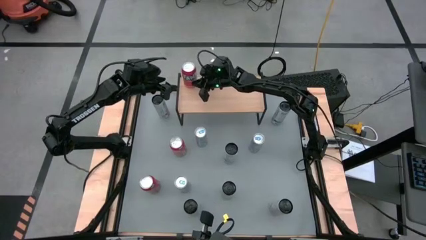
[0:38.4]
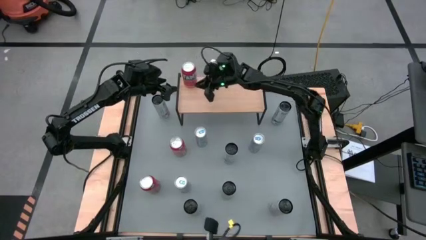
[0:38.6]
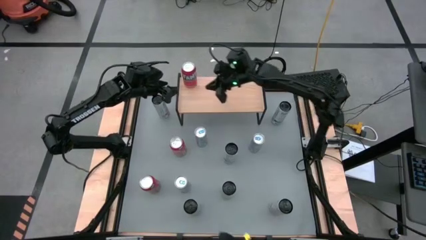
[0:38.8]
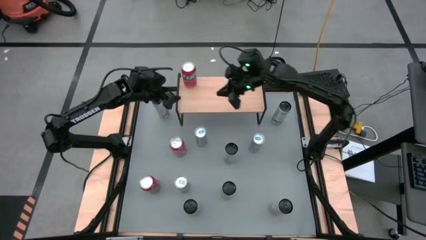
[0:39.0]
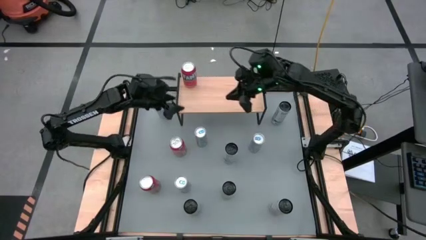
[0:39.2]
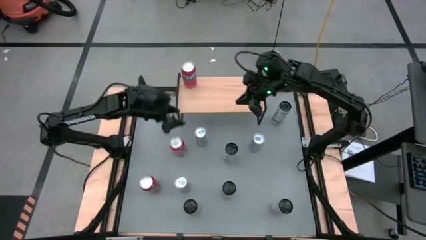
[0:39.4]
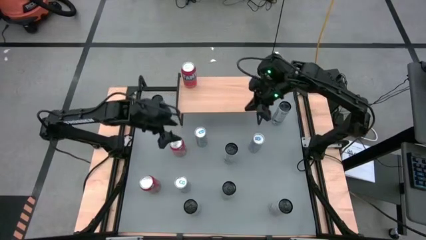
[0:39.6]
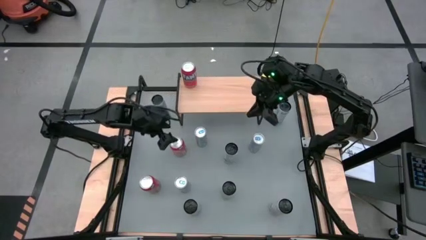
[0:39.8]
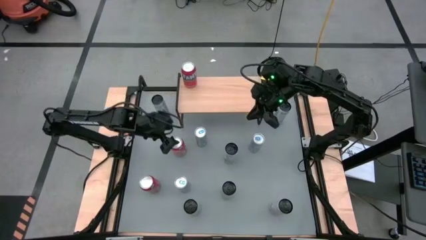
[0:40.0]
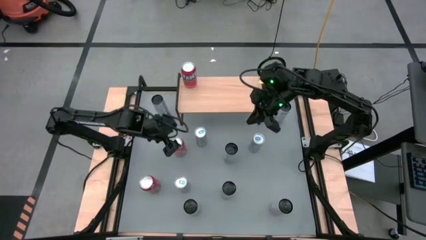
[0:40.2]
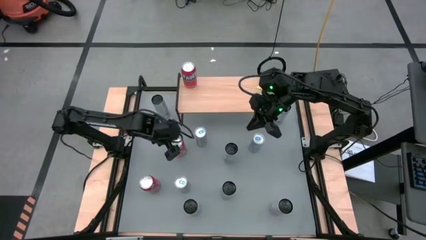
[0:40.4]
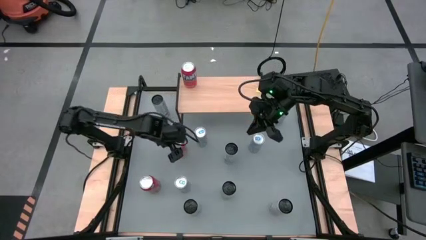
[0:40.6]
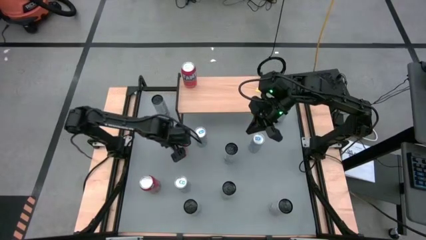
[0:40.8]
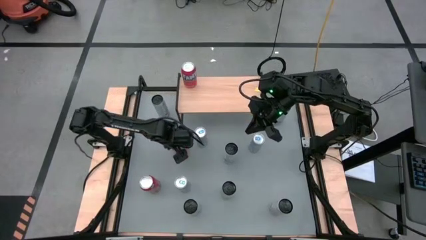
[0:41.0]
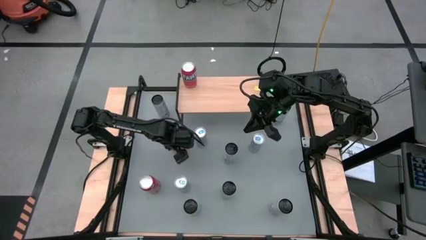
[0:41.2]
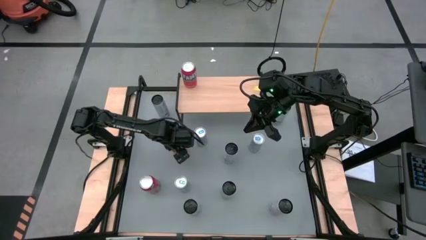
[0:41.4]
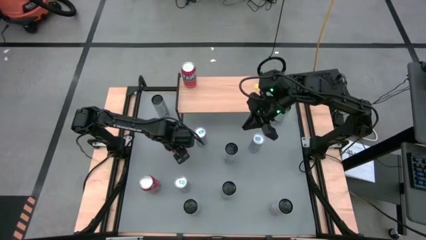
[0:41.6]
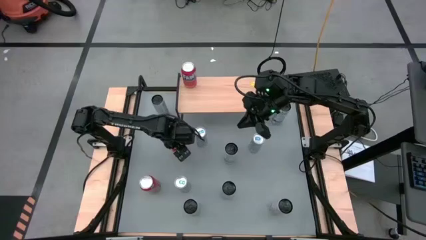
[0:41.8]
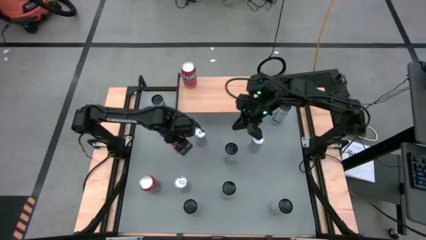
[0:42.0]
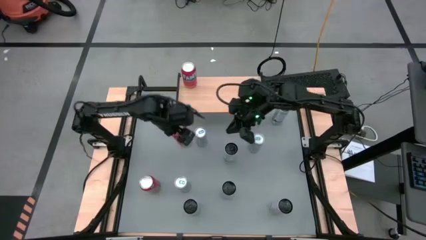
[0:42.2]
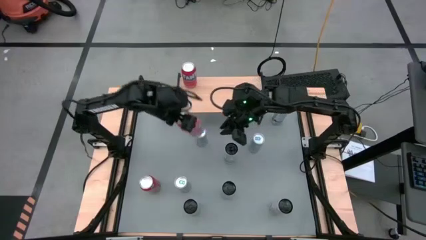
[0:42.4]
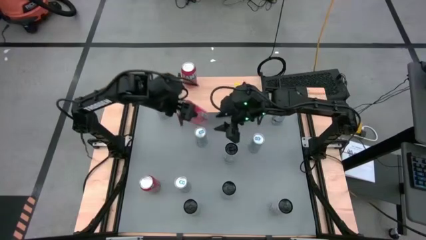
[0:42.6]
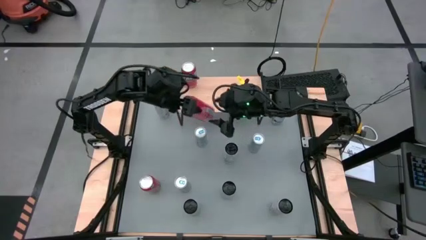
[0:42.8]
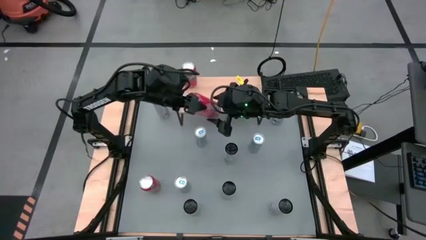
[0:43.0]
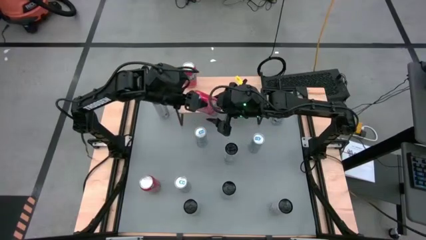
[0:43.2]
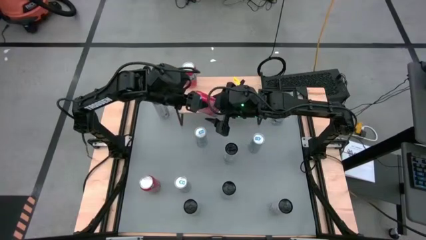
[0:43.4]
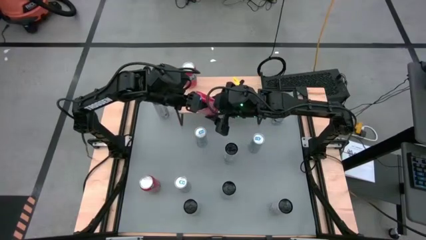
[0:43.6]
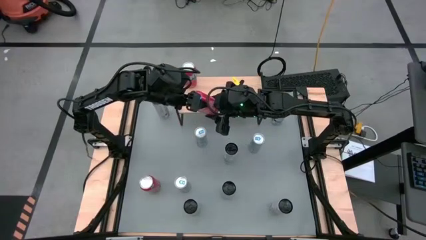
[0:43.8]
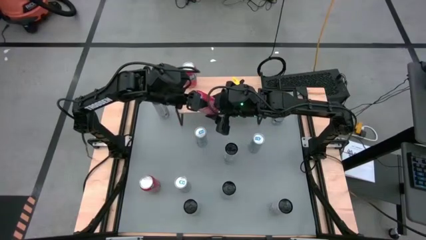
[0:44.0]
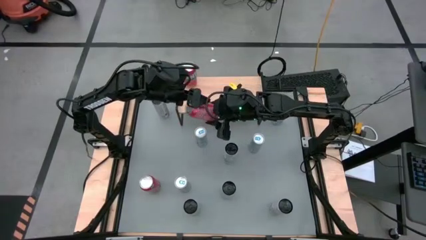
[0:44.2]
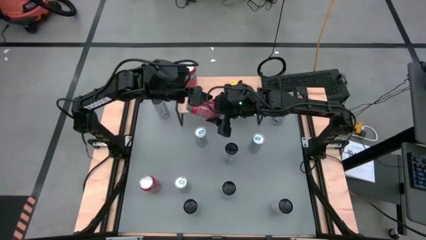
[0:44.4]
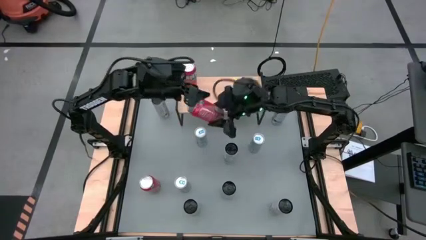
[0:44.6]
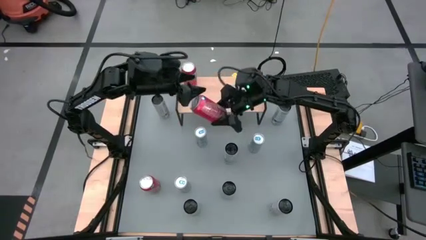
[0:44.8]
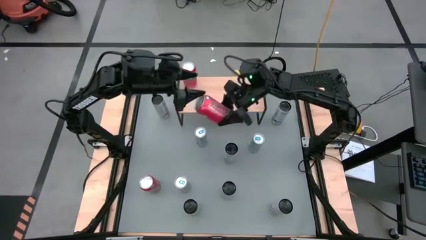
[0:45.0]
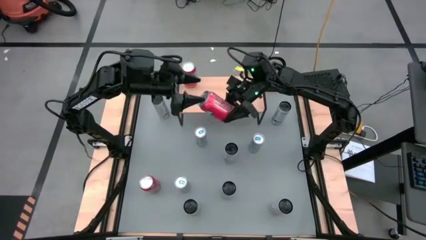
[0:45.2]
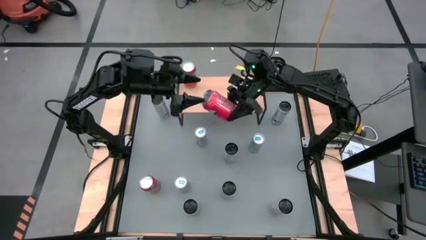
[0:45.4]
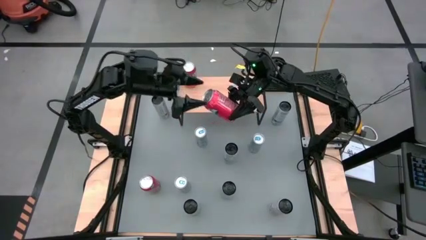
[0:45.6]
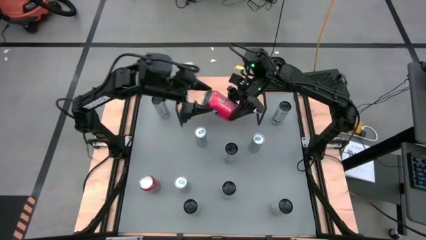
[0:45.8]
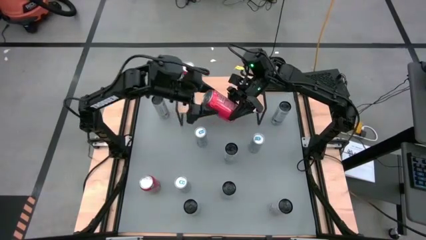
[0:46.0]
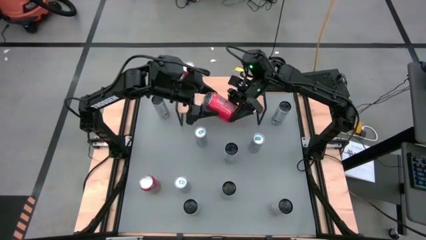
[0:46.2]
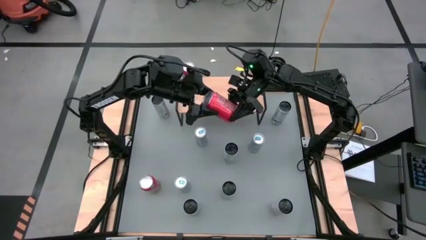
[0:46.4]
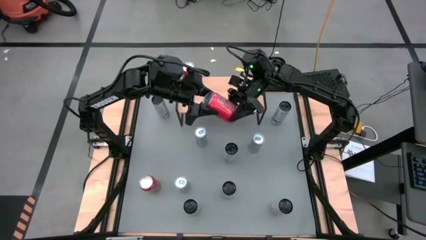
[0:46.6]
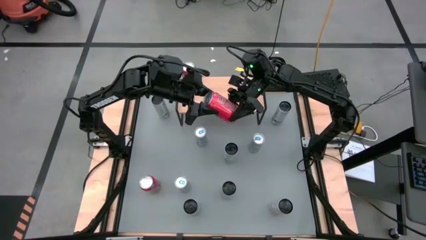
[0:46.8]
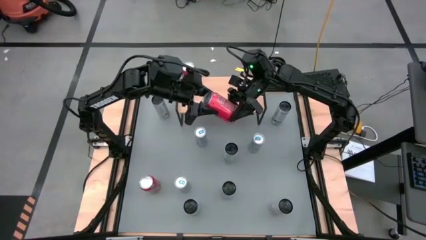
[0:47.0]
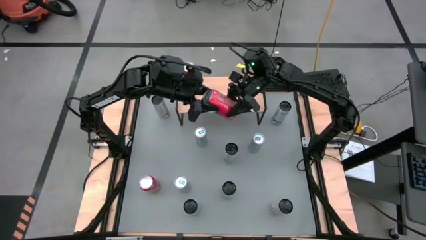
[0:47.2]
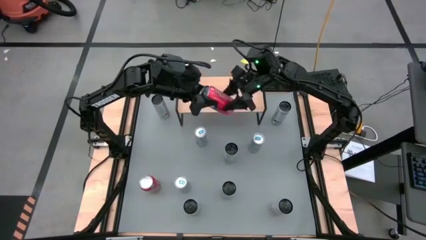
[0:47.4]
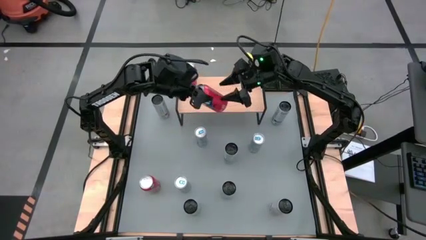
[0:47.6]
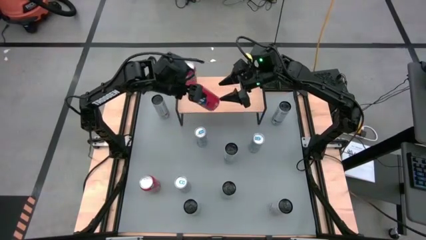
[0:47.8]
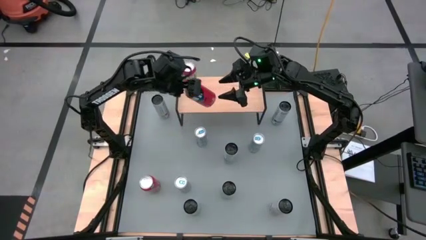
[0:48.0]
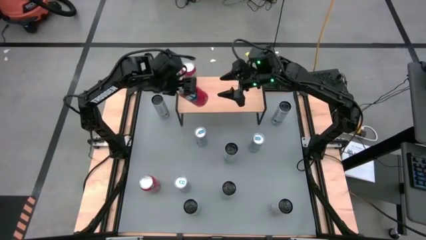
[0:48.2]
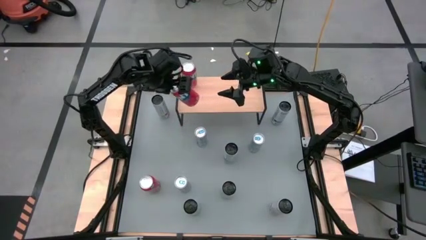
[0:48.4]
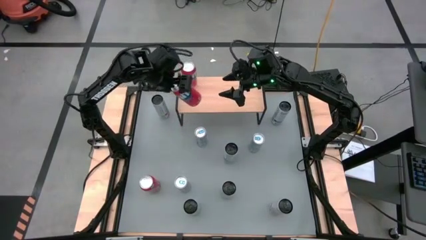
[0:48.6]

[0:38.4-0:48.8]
Task: Place canned beverage on shelf
Put the top red soda can on the shelf aligned with the other red soda can

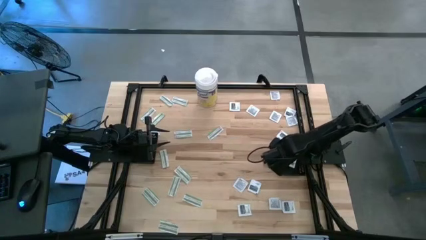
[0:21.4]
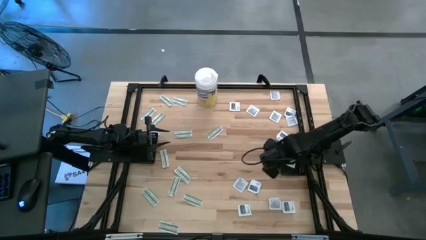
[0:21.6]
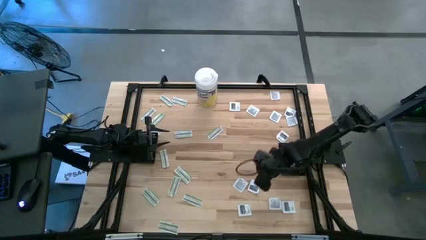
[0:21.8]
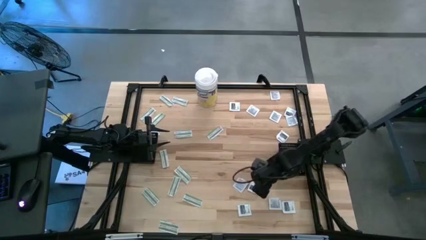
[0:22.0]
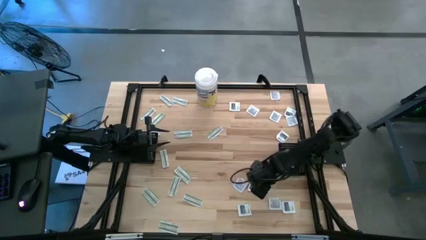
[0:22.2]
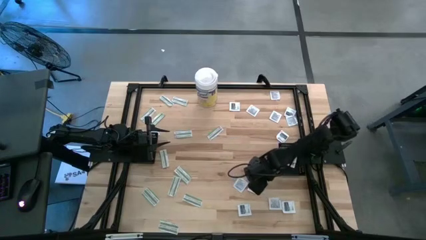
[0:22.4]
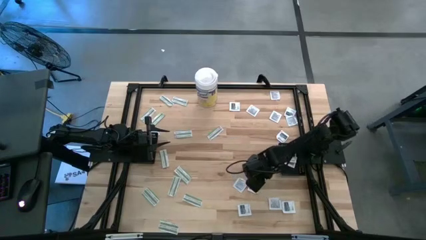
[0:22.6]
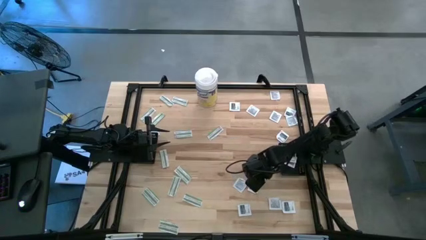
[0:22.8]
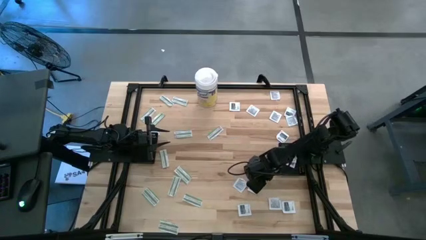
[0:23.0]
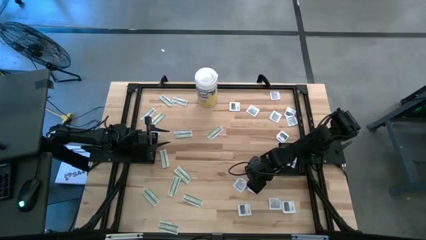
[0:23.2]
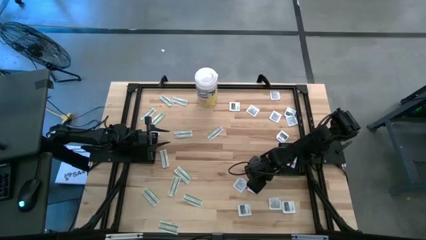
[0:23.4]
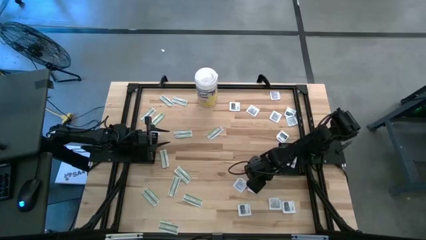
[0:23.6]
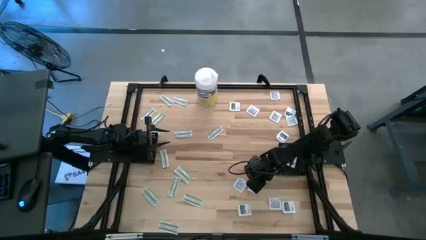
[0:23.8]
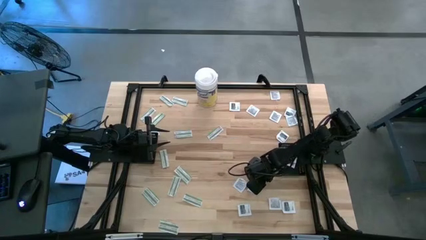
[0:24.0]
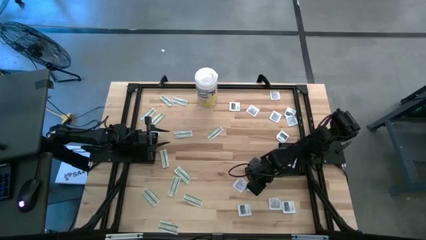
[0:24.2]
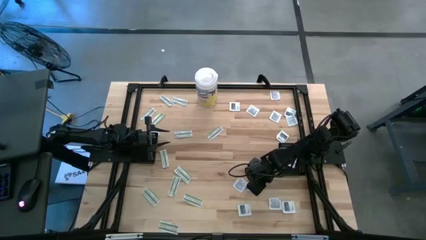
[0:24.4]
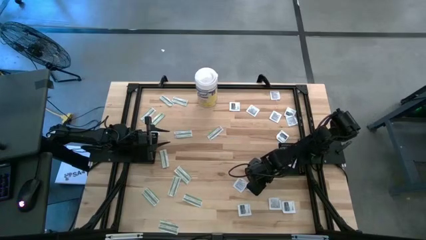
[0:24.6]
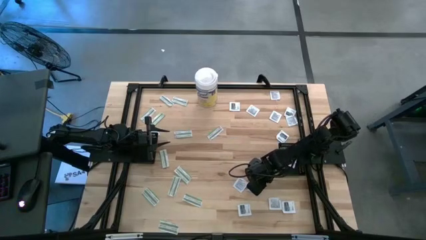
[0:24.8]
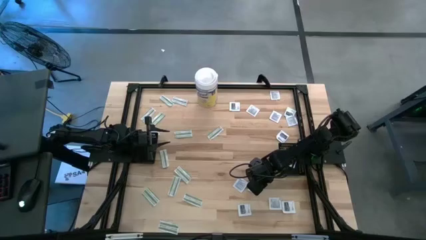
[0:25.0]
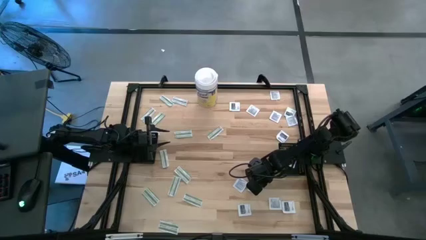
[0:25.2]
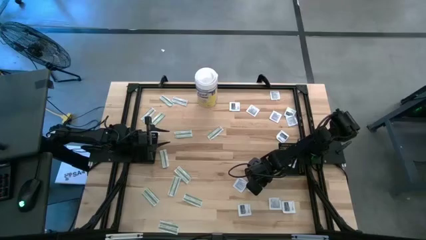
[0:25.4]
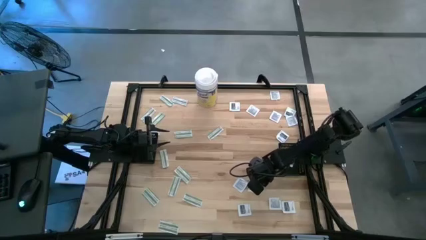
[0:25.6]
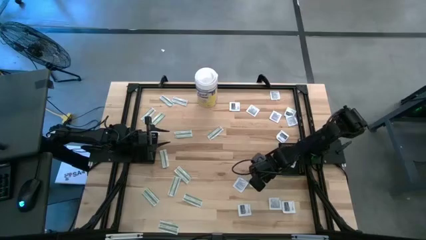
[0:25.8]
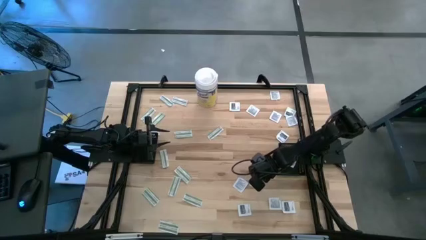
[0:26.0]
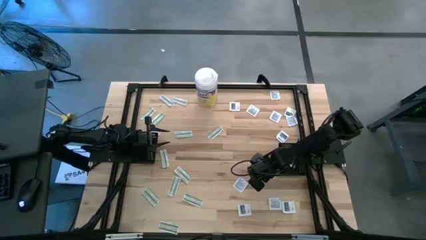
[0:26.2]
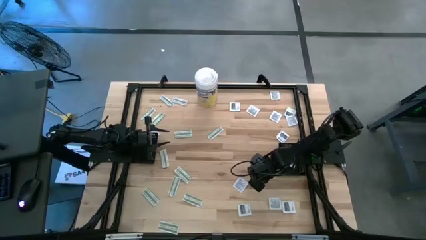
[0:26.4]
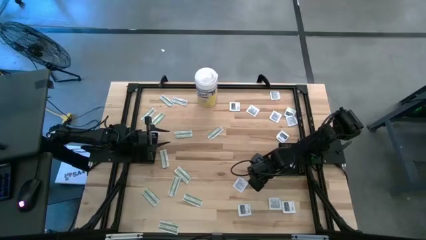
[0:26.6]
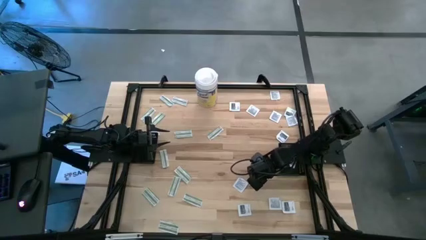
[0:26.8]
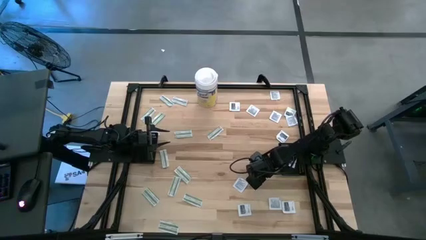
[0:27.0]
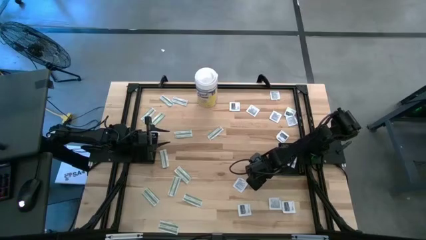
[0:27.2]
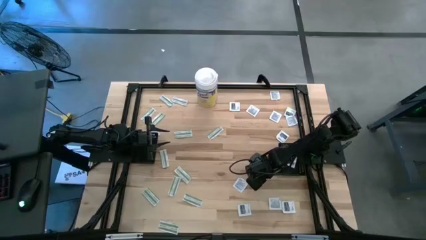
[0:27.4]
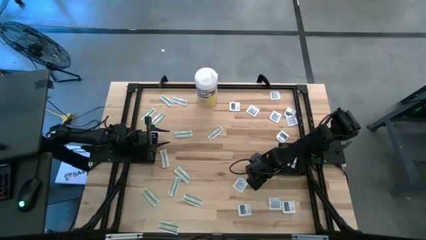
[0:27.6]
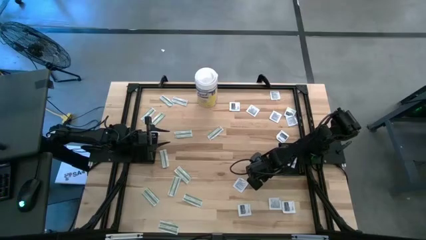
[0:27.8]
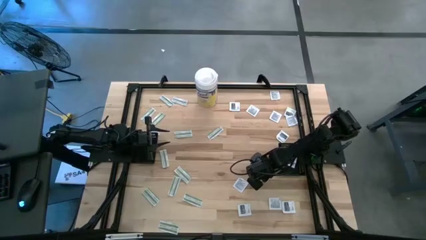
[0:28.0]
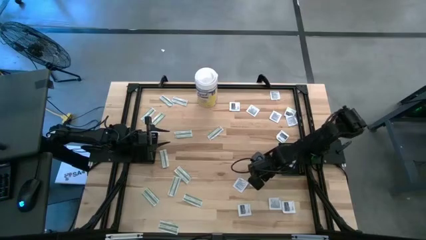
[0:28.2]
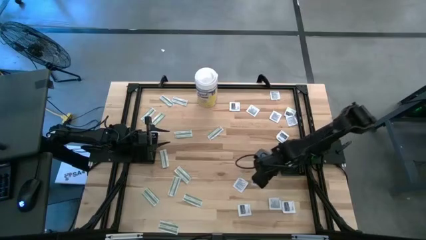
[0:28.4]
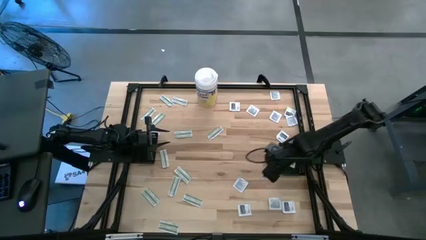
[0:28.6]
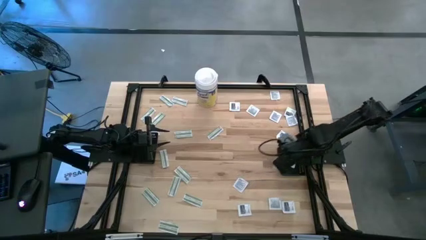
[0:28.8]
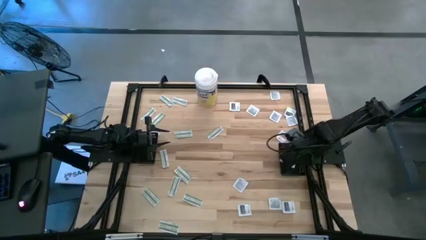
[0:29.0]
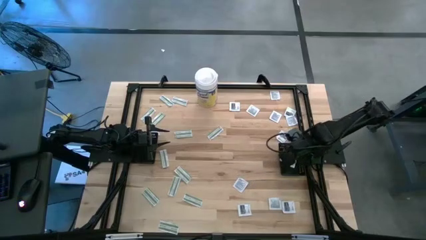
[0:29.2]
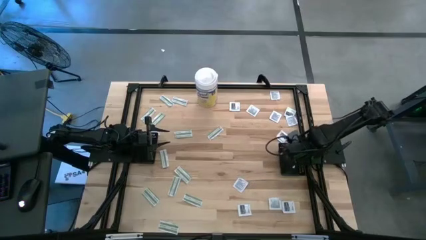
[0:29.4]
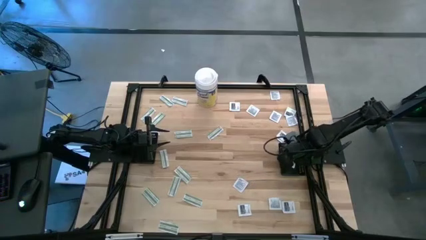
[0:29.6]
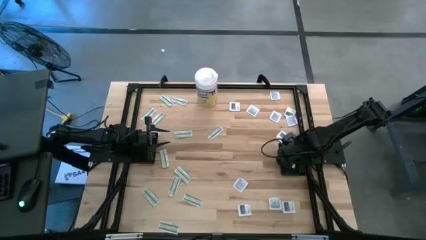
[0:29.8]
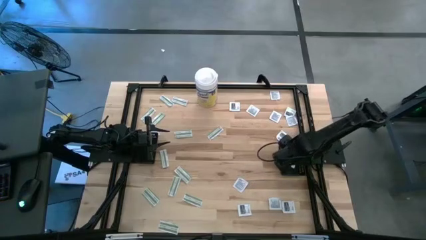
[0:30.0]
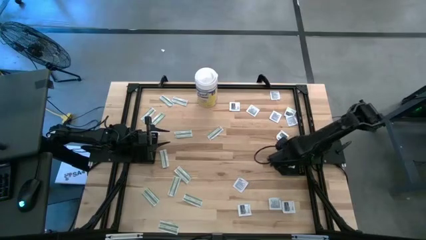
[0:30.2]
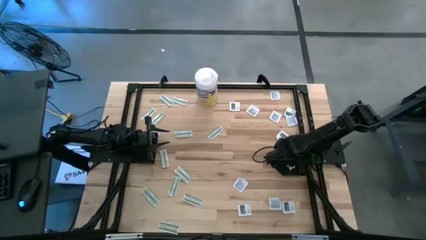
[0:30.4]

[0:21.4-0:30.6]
Task: Pick & Place First Aid Supplies
Put the towelette pack into the right black basket
